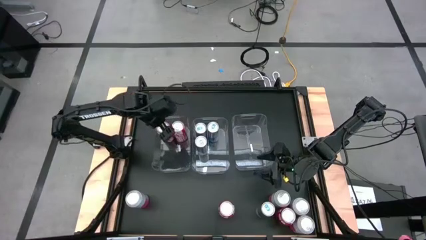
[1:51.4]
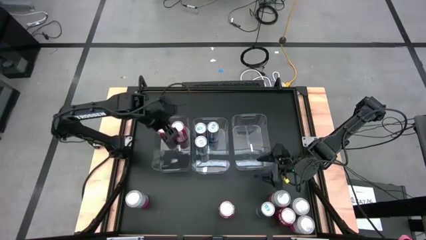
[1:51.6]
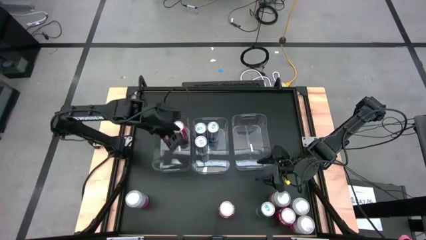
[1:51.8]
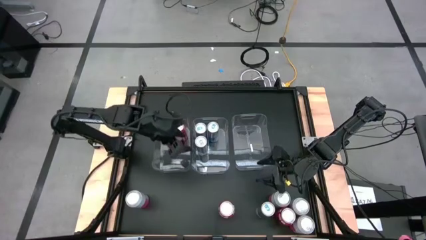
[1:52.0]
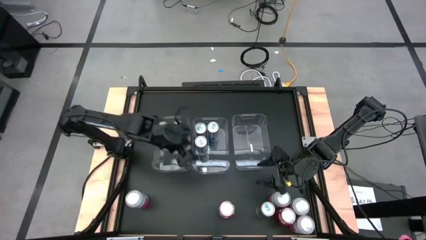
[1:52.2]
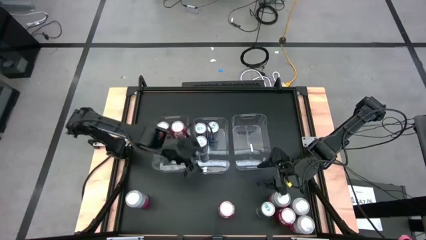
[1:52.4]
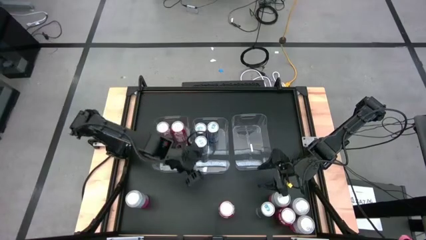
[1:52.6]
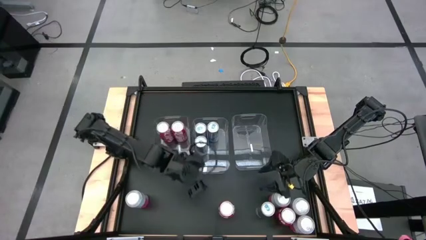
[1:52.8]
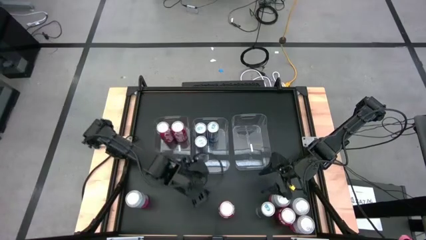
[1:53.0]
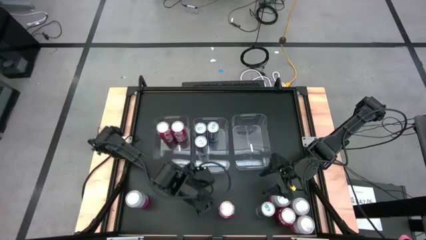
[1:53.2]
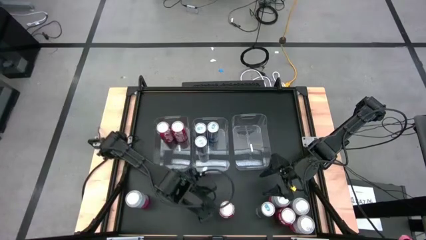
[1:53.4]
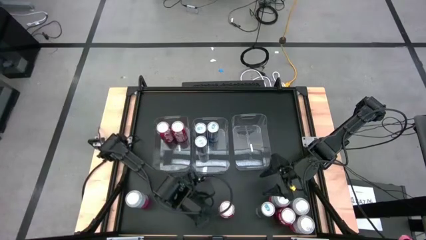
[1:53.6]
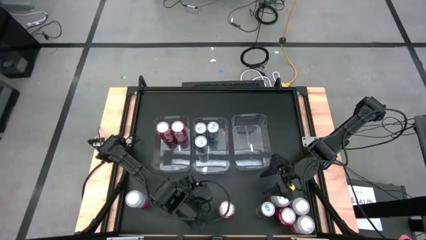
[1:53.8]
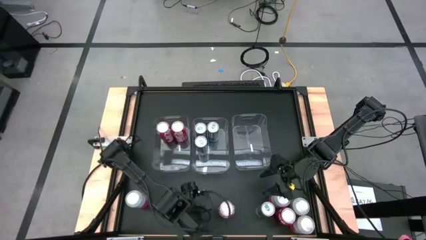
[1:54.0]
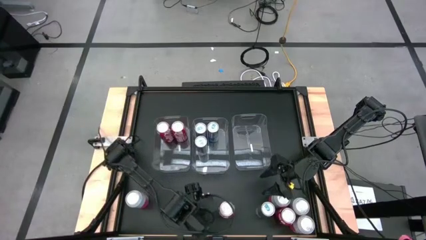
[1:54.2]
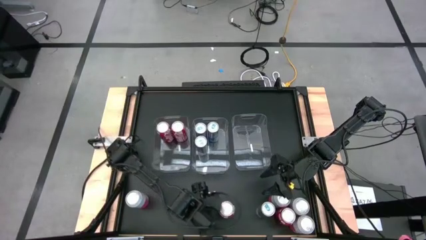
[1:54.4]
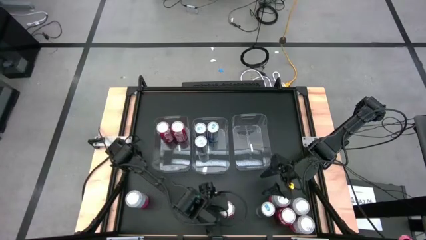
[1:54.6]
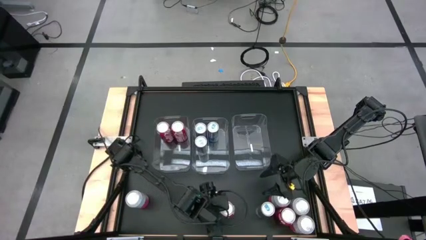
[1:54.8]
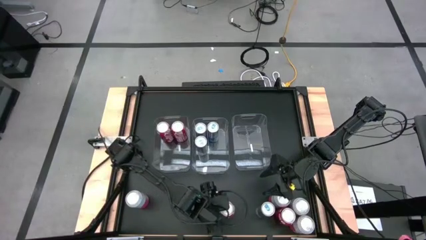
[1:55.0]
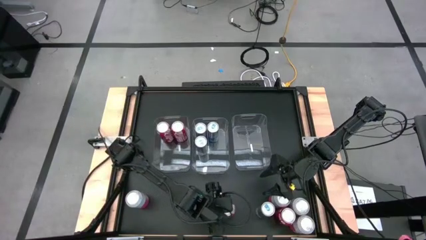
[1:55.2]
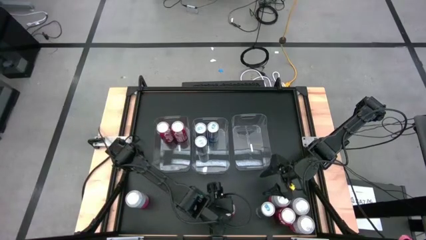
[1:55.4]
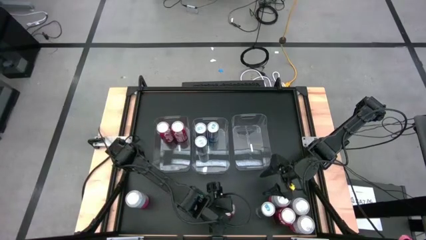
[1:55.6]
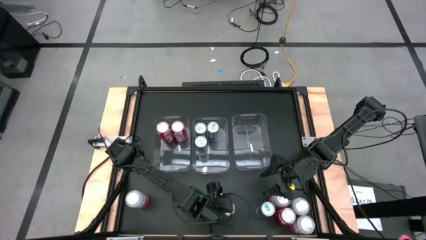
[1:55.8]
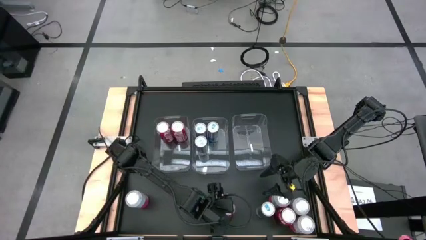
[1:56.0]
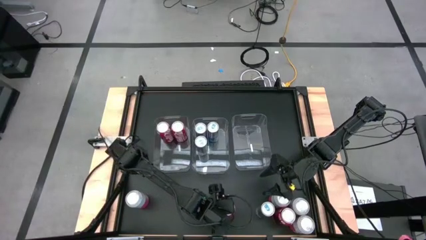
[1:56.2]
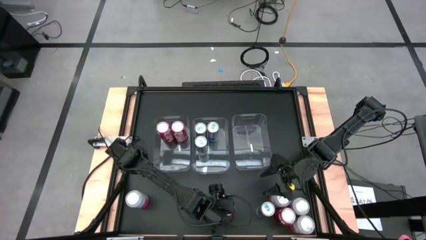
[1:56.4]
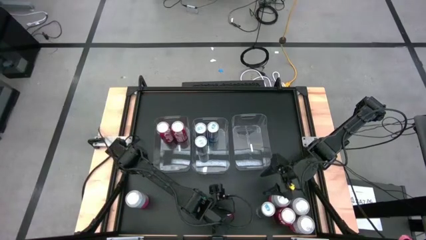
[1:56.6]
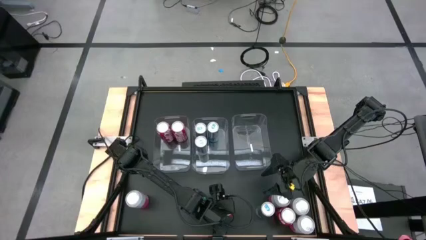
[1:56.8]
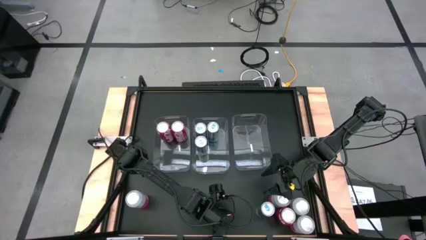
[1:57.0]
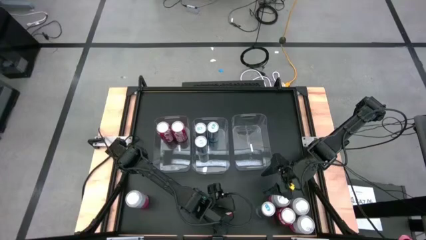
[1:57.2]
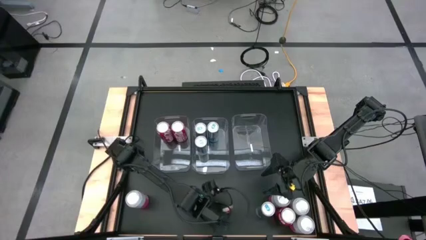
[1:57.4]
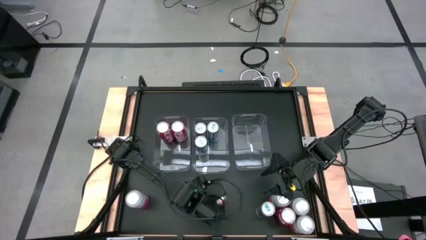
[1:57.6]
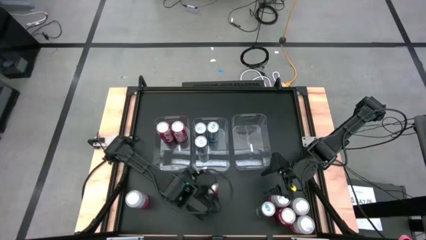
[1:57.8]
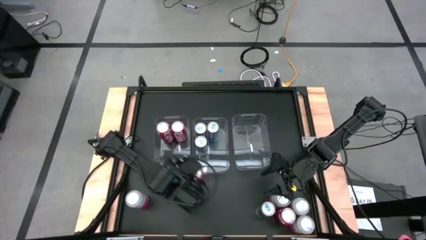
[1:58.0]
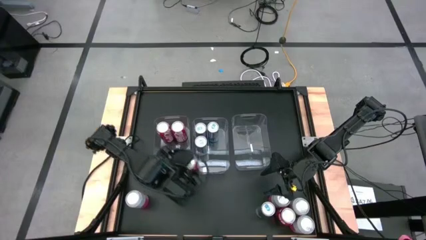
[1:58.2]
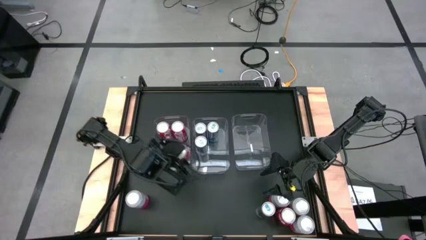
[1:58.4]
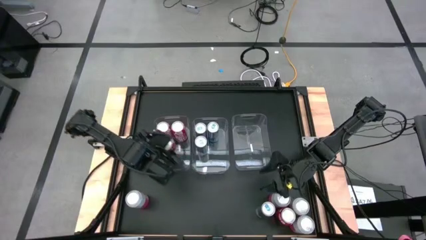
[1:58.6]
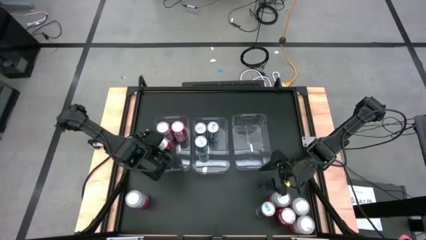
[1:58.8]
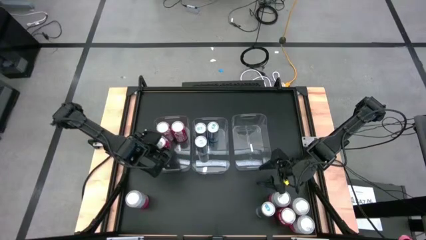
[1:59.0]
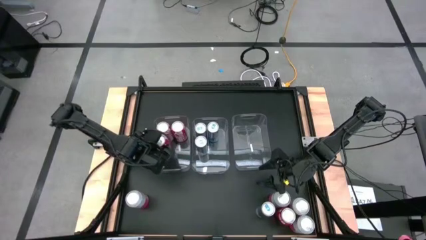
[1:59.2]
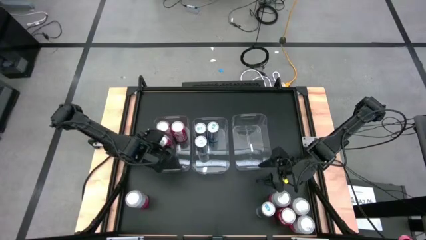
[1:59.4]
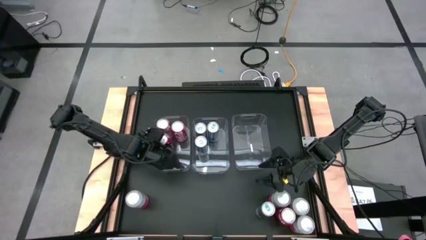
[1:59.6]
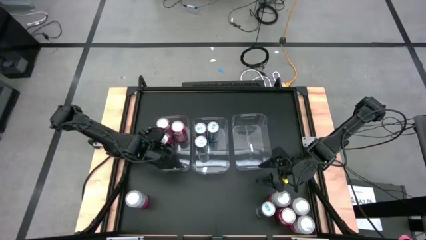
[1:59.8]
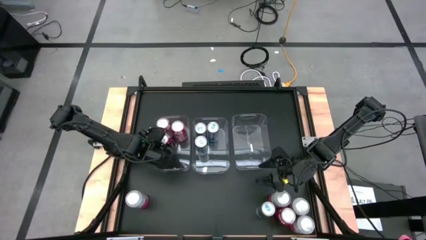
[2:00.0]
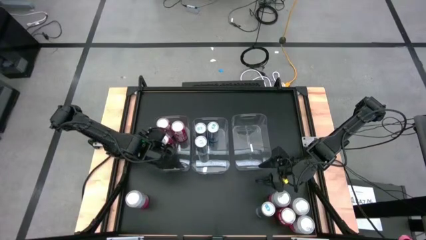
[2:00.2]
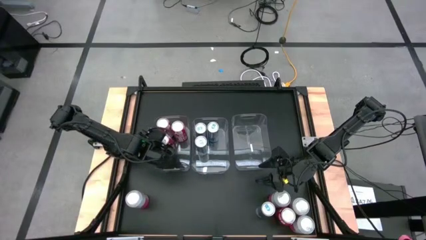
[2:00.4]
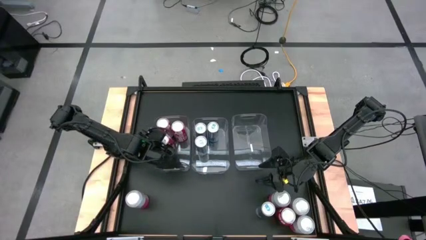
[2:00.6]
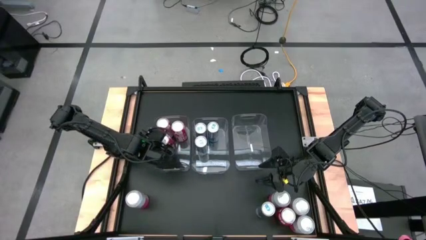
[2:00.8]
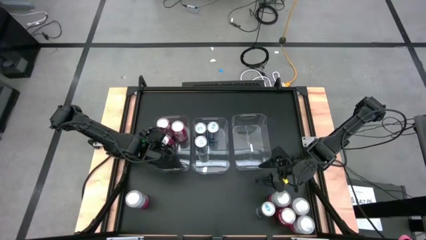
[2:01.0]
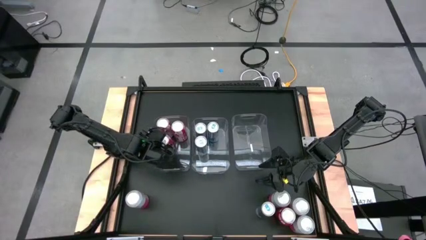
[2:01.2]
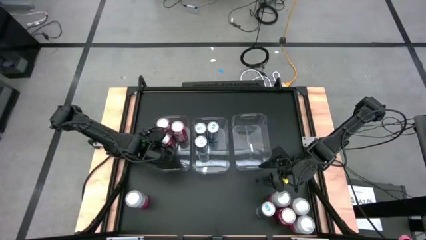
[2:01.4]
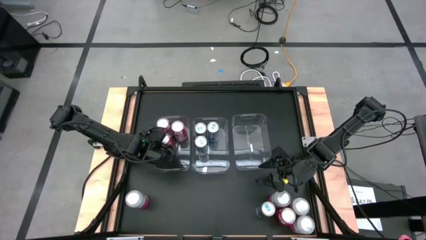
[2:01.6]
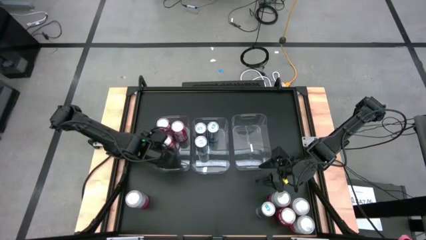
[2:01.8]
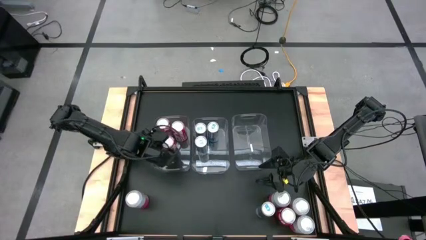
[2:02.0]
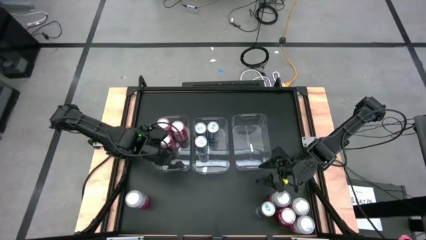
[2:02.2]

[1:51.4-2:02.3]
Task: Sort soda cans
Put the red soda can into the left transparent bin

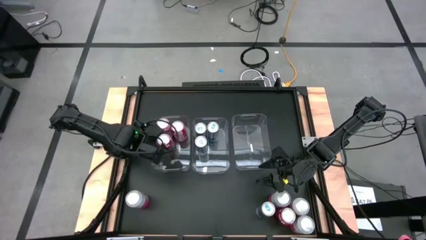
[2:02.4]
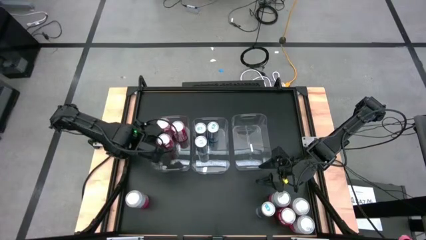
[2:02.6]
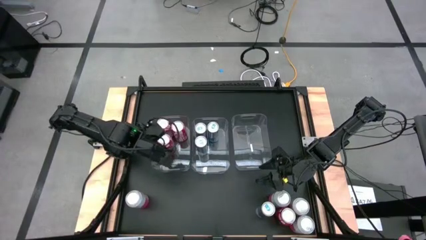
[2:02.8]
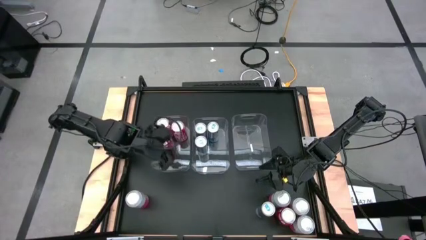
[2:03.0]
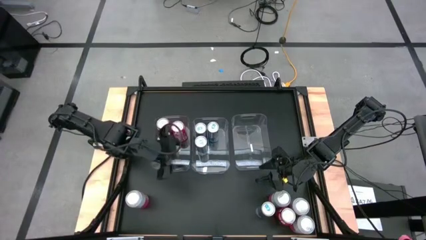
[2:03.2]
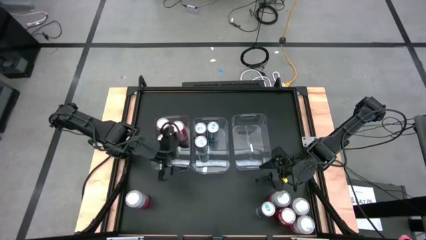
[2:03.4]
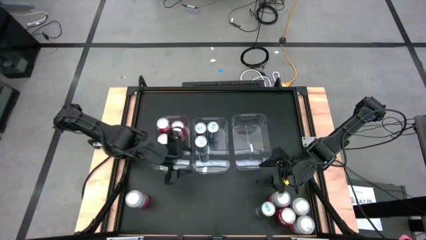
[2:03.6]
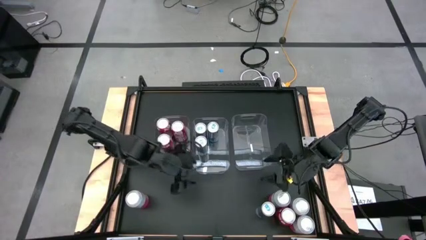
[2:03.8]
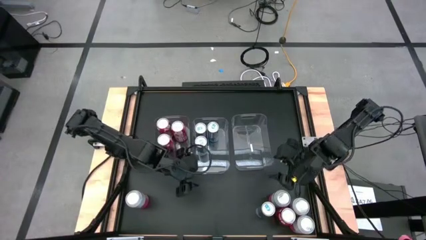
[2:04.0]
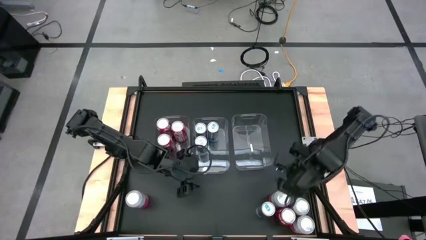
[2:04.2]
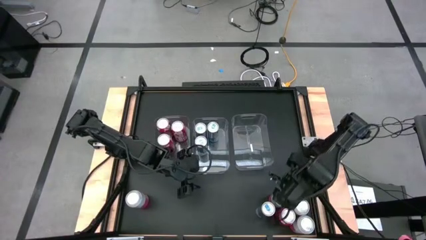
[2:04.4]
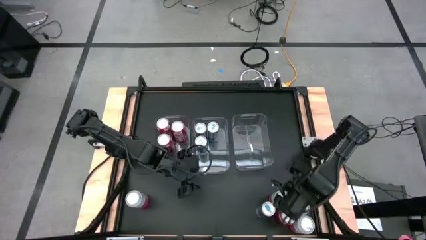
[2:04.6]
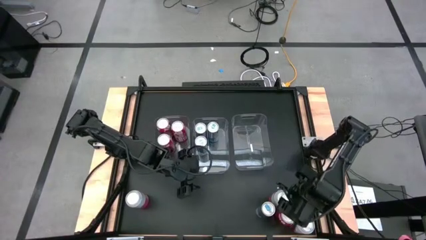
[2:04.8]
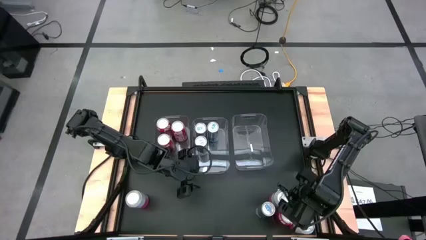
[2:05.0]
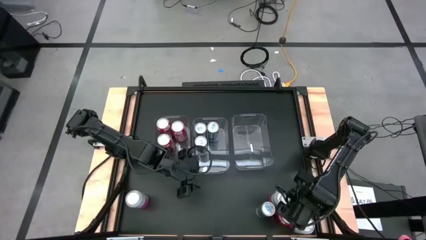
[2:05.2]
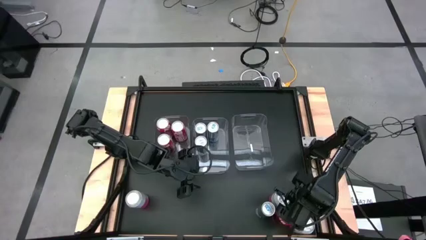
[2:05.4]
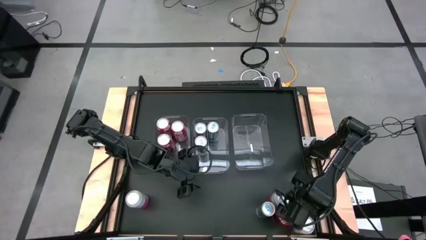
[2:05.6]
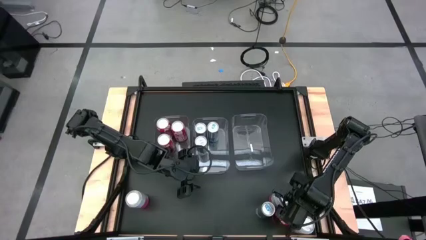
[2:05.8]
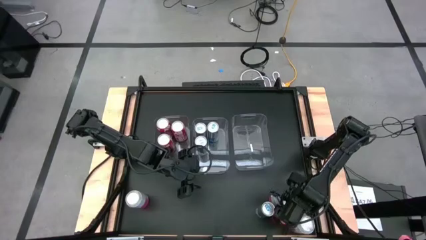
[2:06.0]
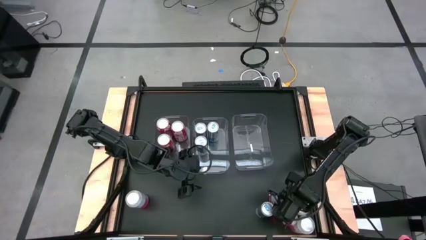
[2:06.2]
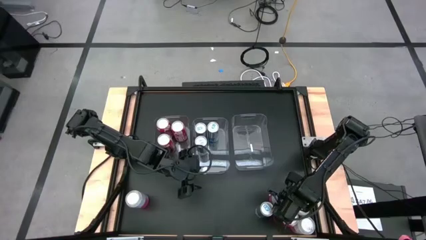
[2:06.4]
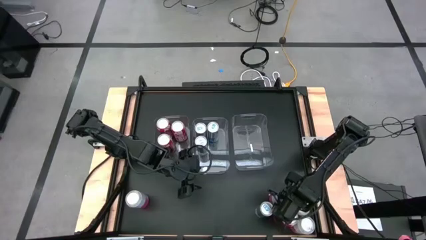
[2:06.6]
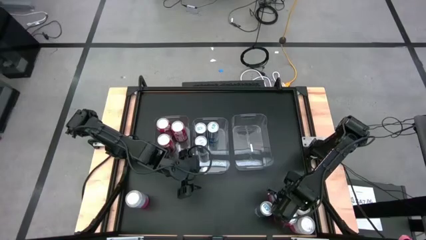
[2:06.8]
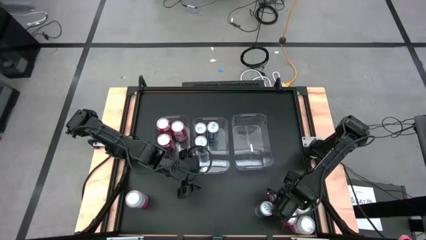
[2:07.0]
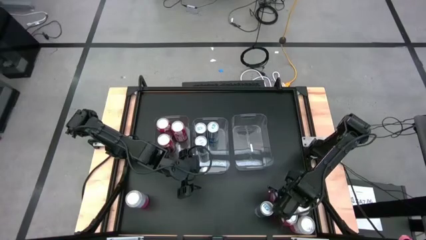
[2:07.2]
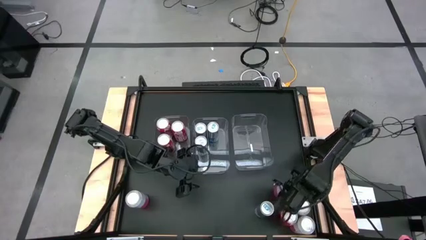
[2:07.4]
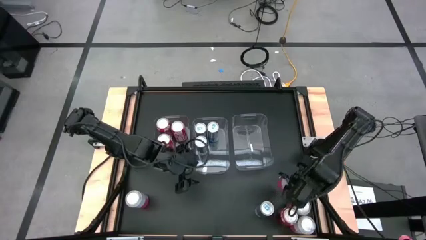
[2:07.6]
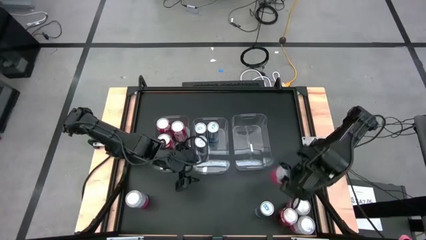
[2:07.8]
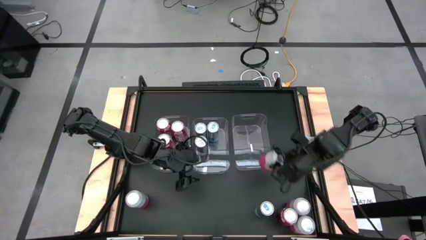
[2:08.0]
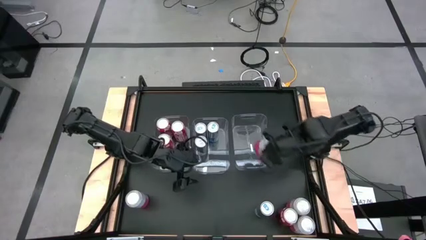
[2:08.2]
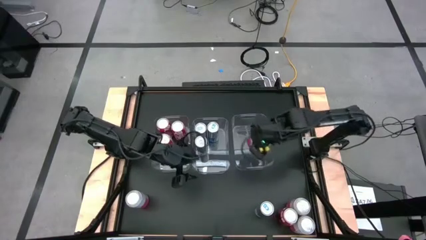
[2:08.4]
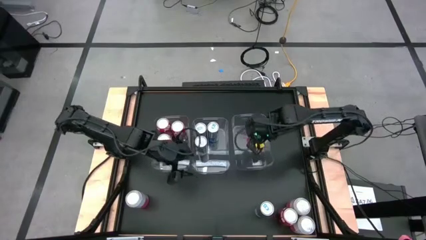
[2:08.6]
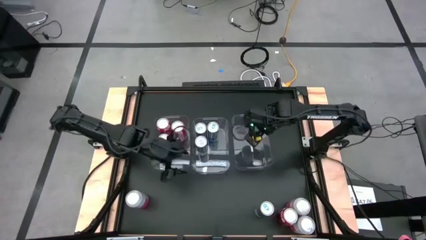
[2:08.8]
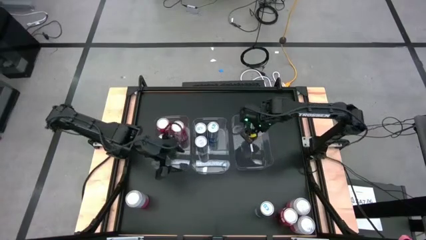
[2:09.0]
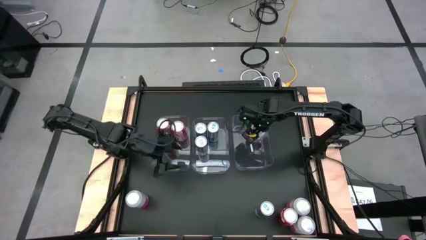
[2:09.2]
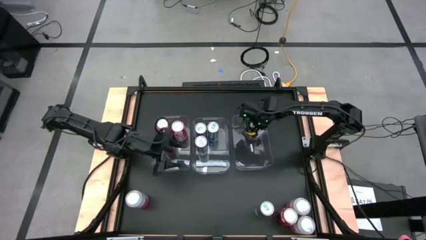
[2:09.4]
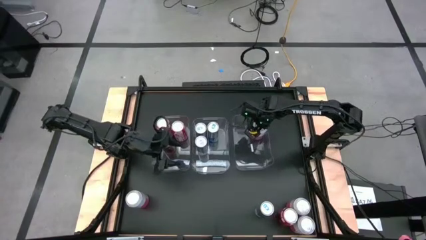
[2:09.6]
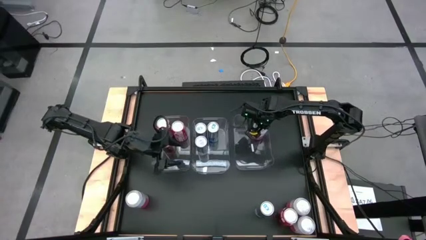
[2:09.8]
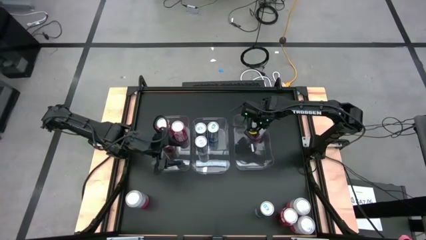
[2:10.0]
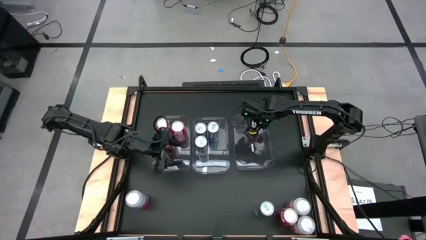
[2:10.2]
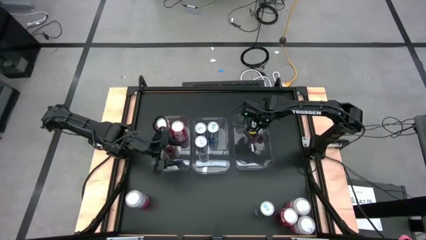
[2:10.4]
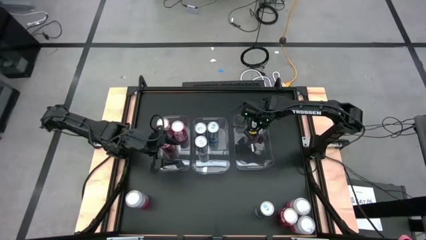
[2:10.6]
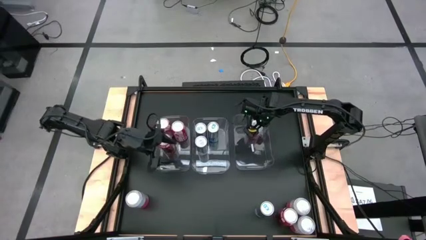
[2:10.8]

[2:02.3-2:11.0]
Put the pink-white soda can to the right transparent bin
